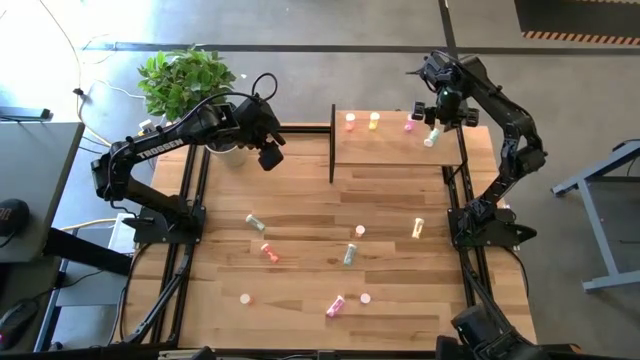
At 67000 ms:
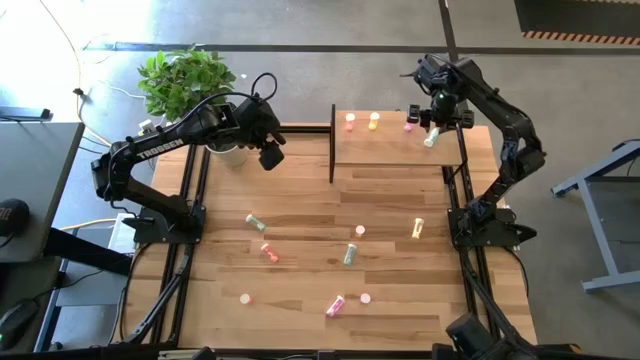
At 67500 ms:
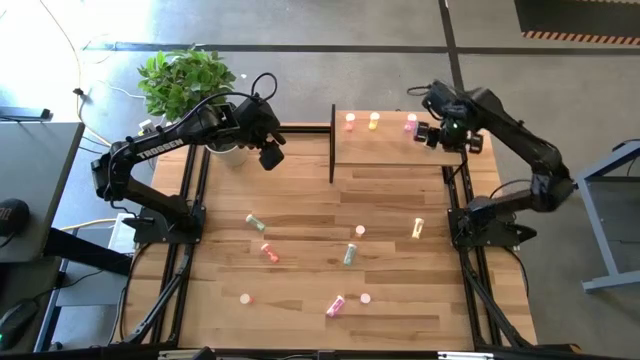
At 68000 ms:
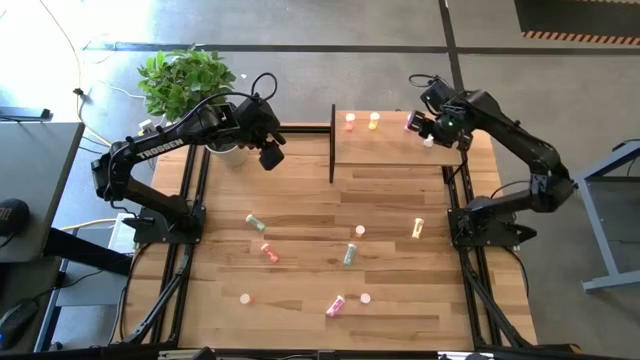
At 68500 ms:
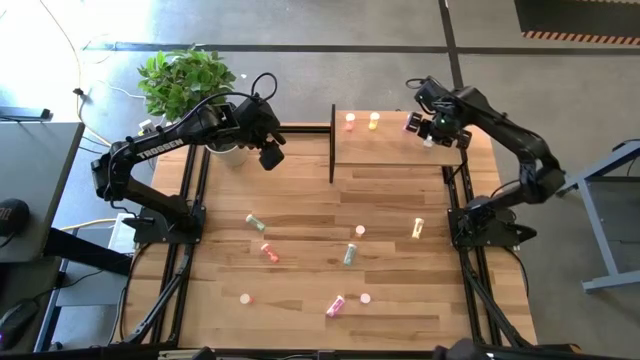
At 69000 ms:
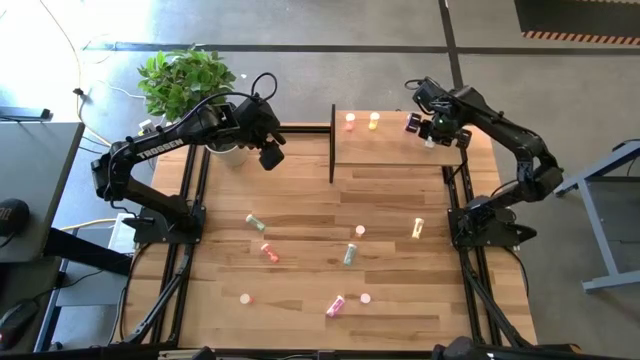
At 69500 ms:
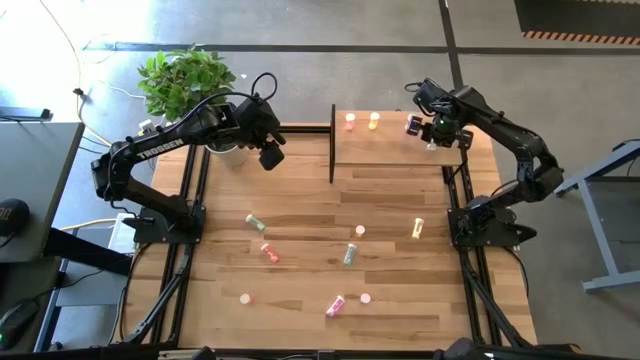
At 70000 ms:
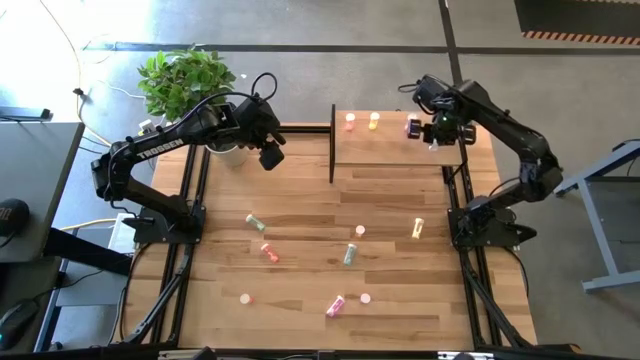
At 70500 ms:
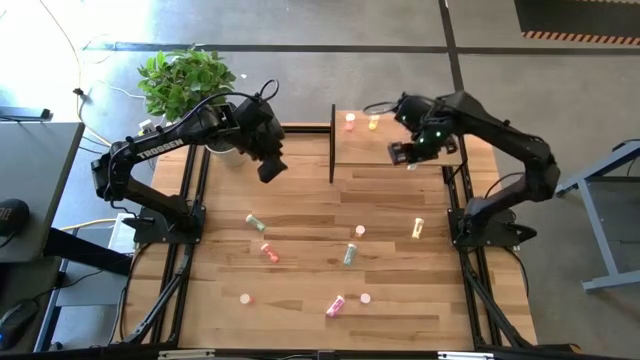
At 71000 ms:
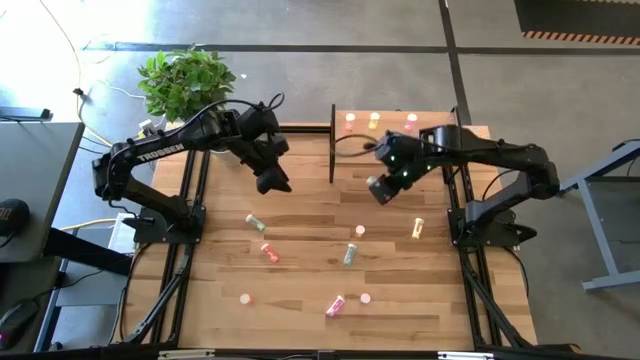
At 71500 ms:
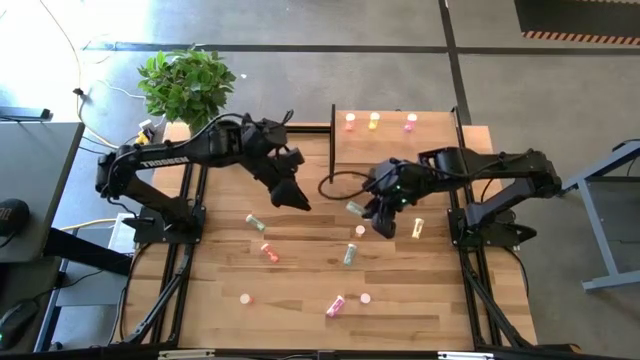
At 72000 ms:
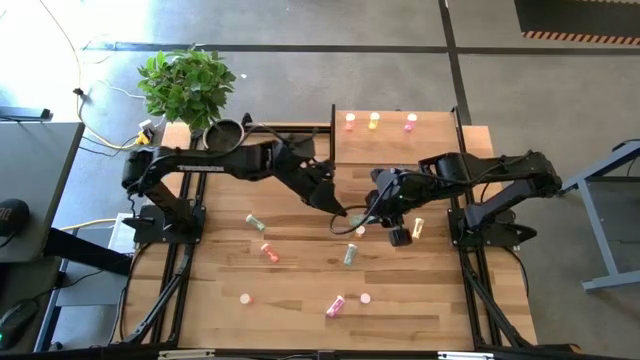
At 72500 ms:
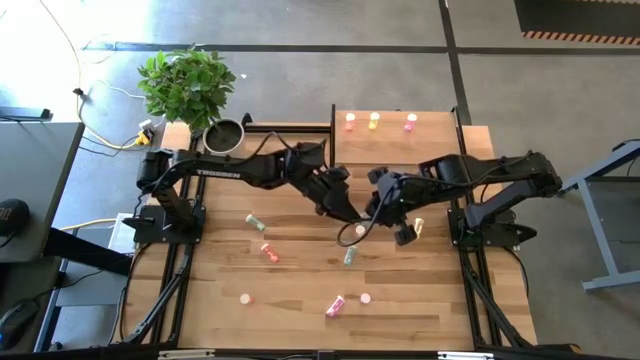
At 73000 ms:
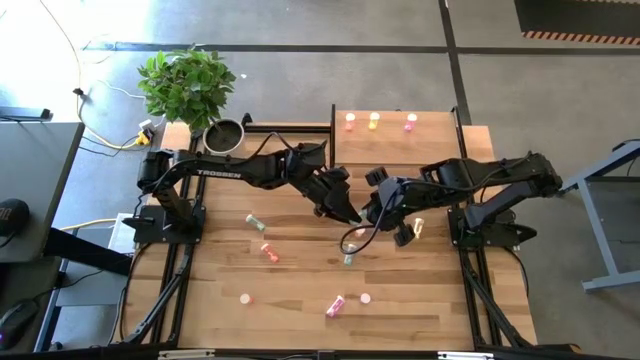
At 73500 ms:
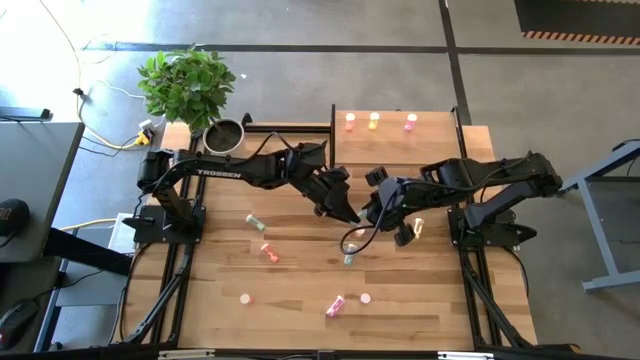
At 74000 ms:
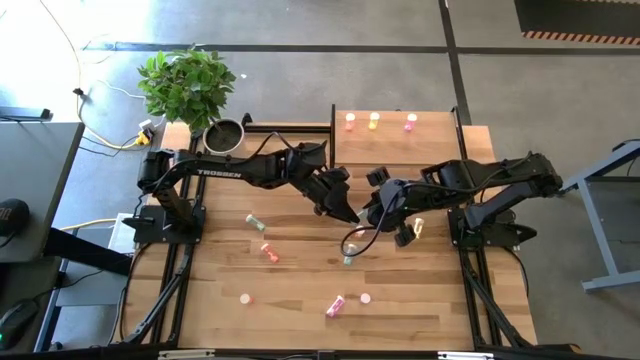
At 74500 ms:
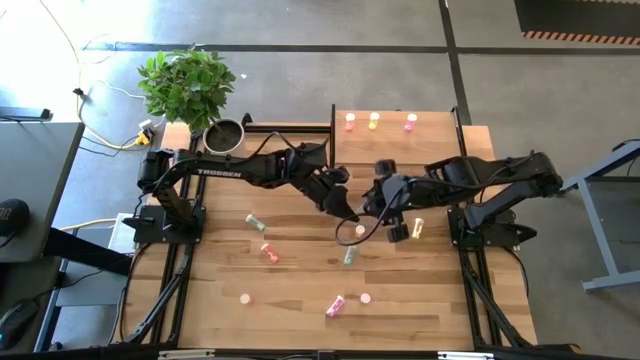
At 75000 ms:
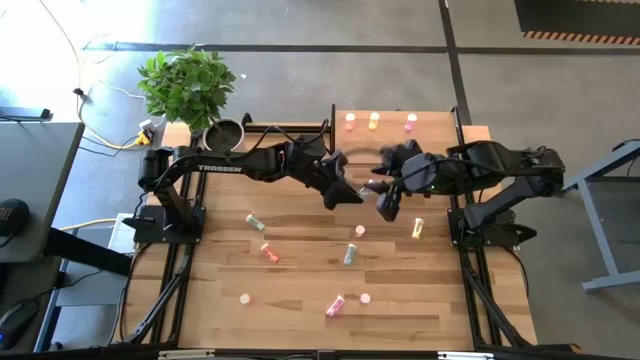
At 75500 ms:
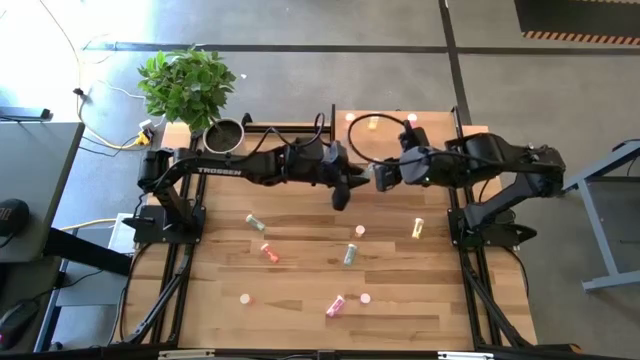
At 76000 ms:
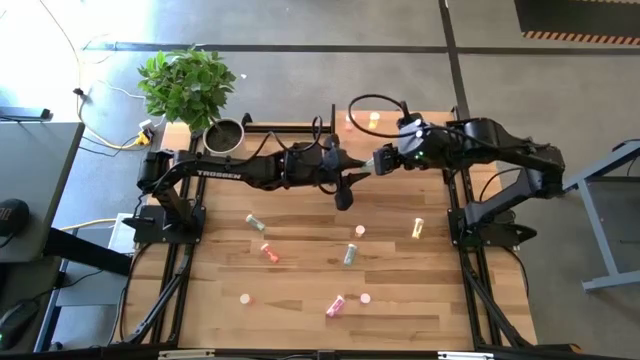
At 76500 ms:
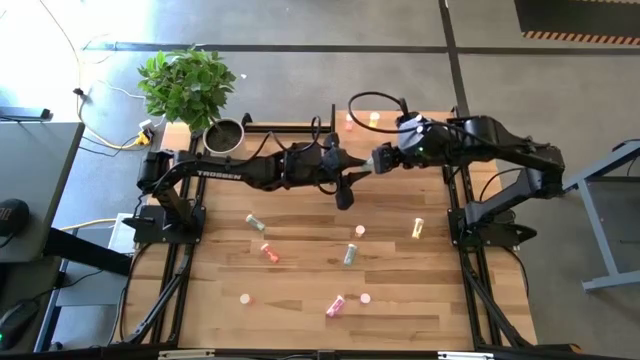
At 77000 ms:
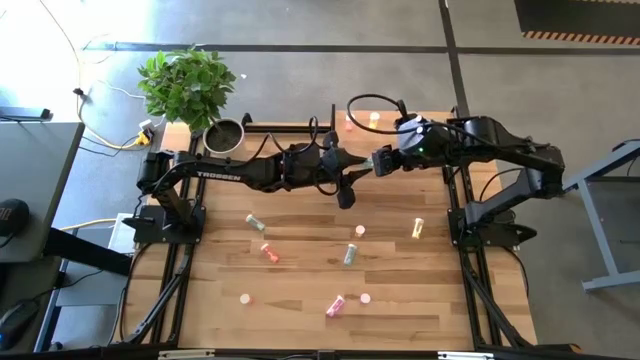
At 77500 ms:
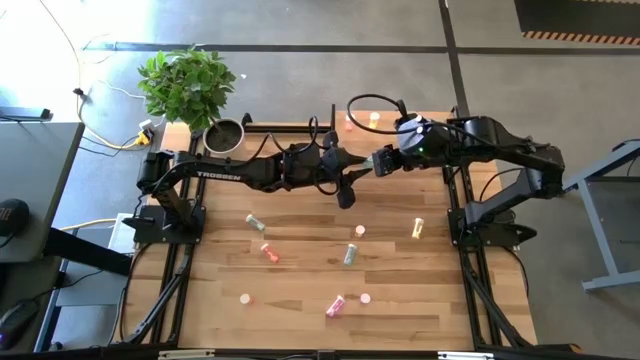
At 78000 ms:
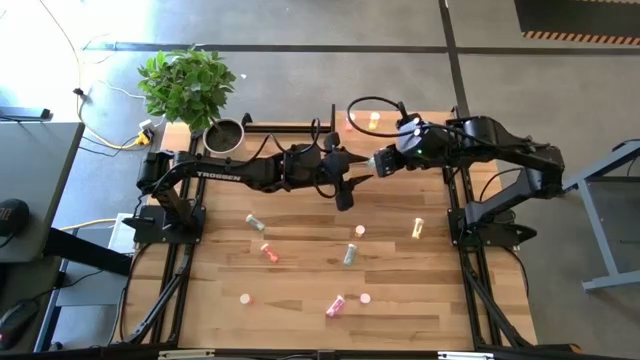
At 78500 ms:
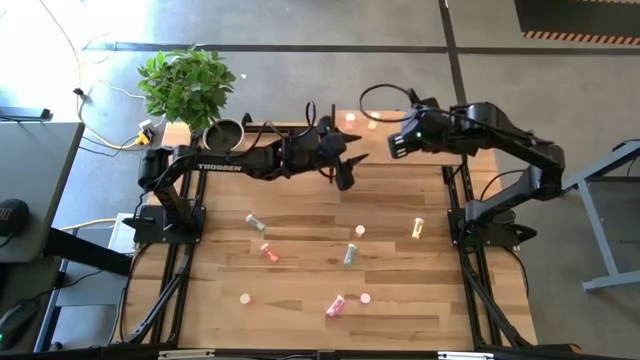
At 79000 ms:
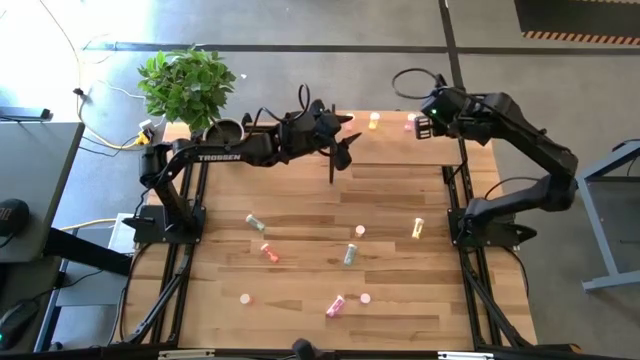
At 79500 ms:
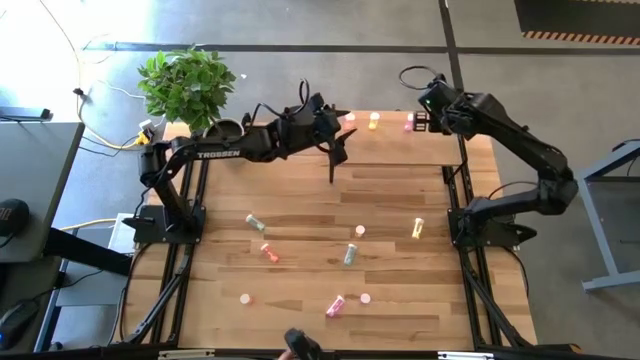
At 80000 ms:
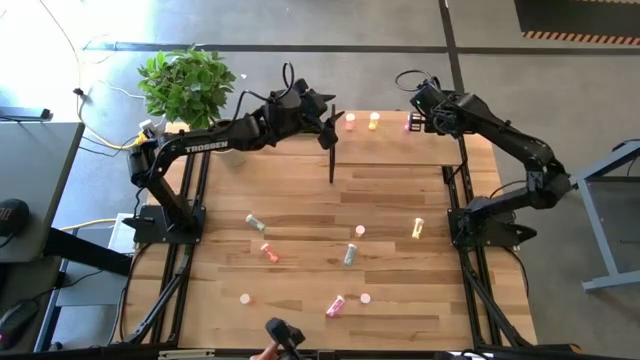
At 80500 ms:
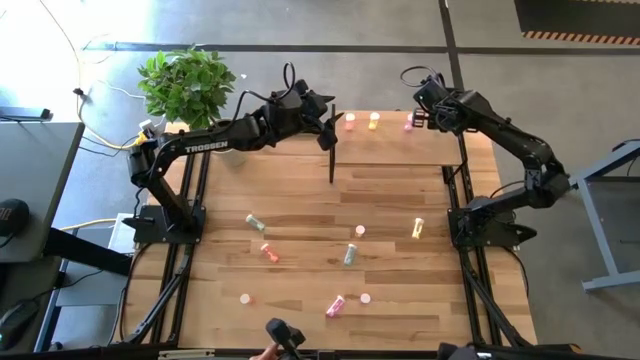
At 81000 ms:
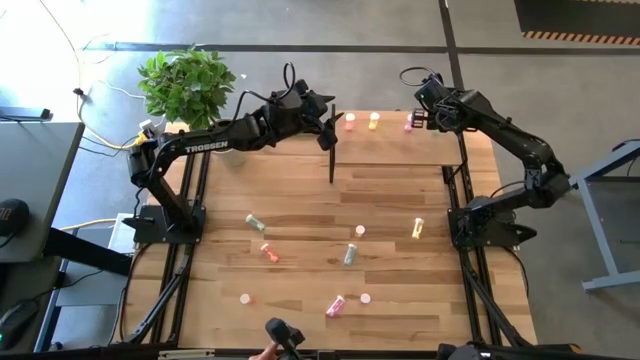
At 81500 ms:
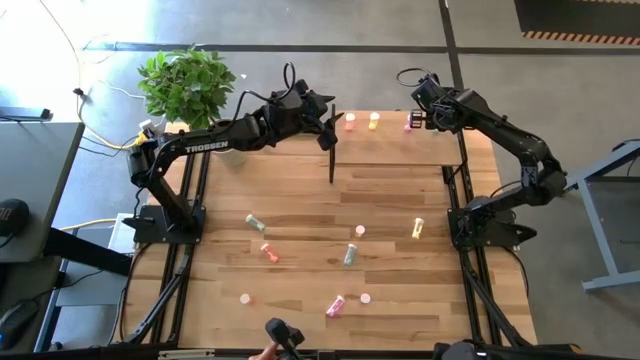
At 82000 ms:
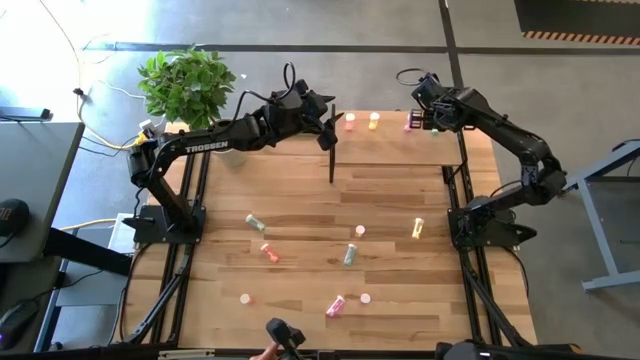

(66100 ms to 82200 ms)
Task: Pick and place medicine bottles onto shelf by color
Put the bottom blue medicine bottle on the shelf

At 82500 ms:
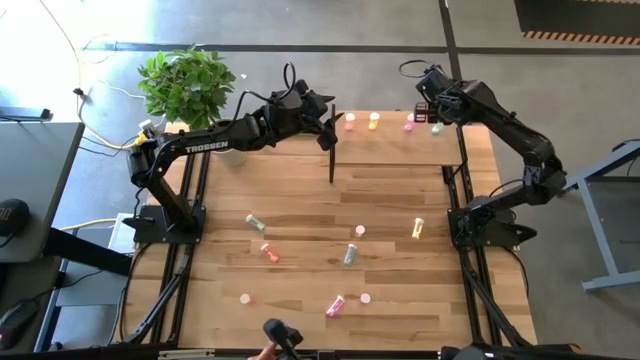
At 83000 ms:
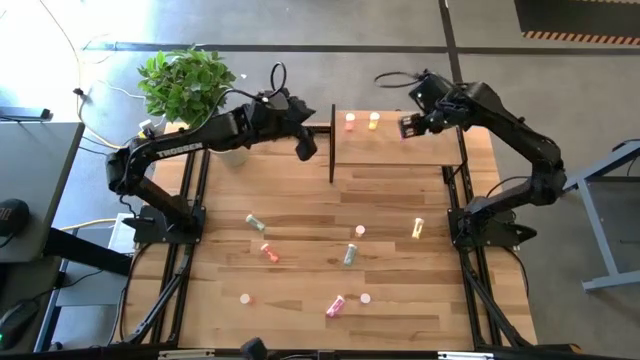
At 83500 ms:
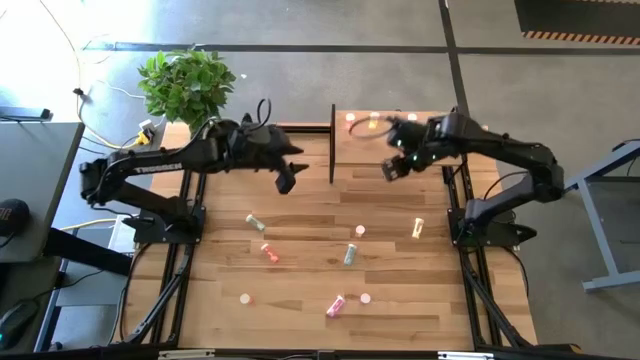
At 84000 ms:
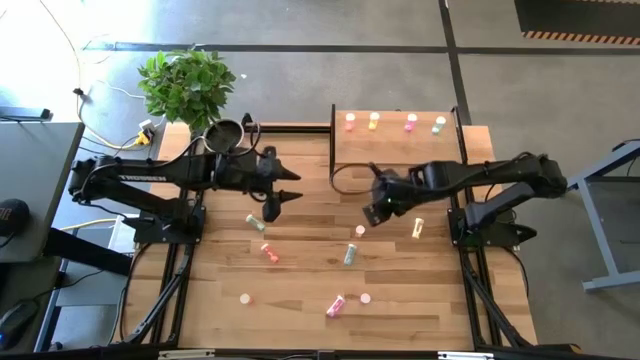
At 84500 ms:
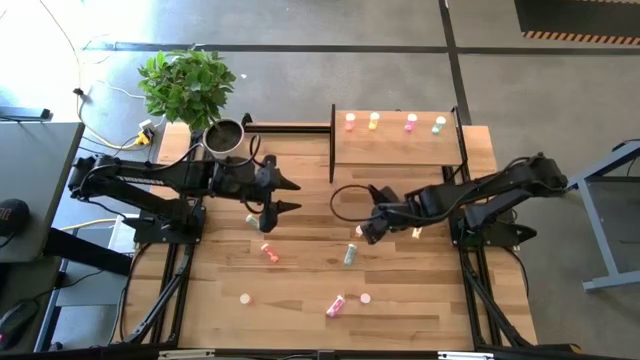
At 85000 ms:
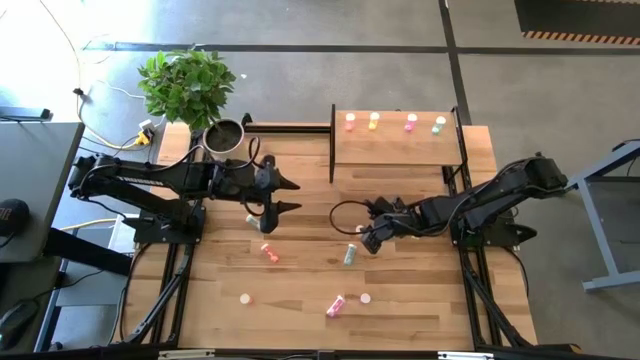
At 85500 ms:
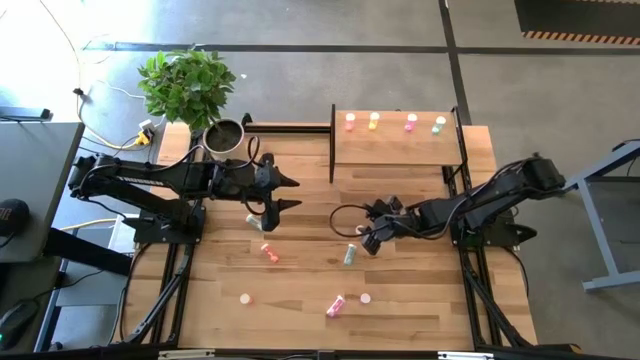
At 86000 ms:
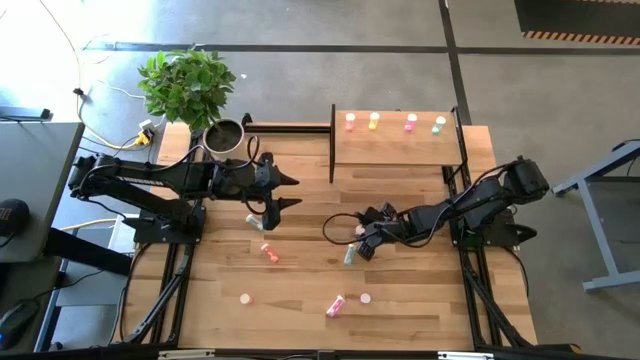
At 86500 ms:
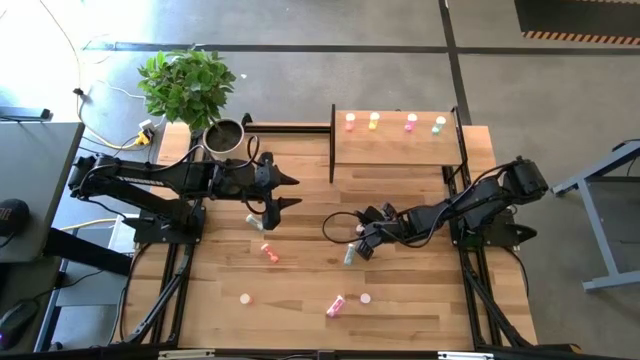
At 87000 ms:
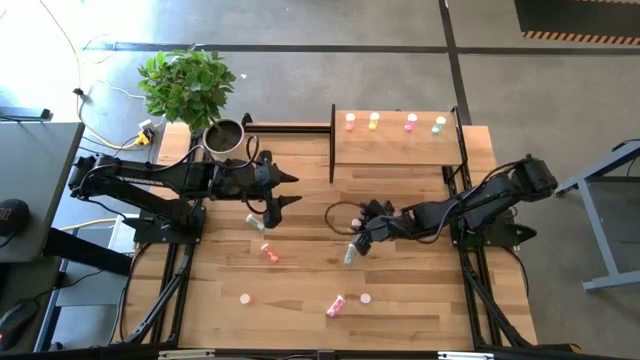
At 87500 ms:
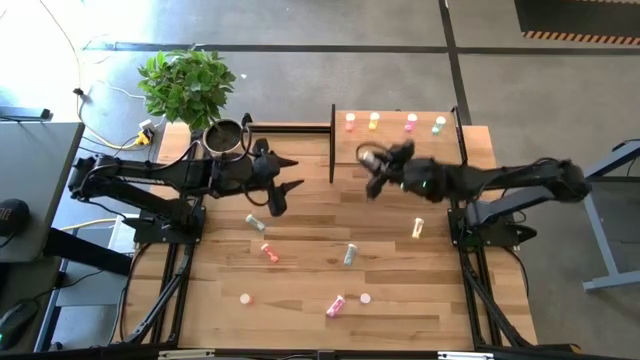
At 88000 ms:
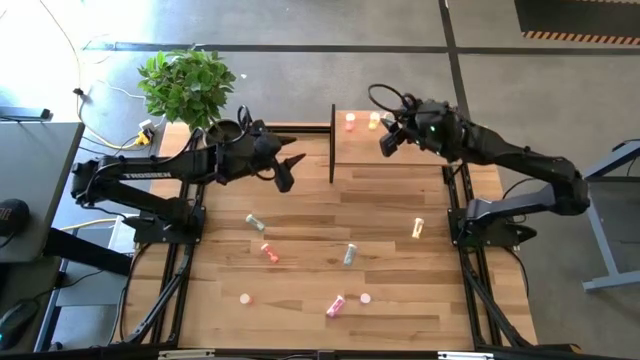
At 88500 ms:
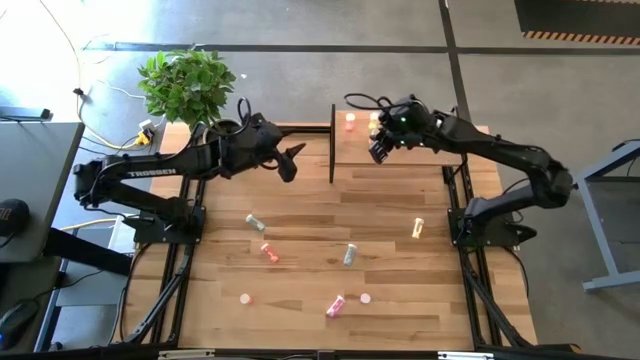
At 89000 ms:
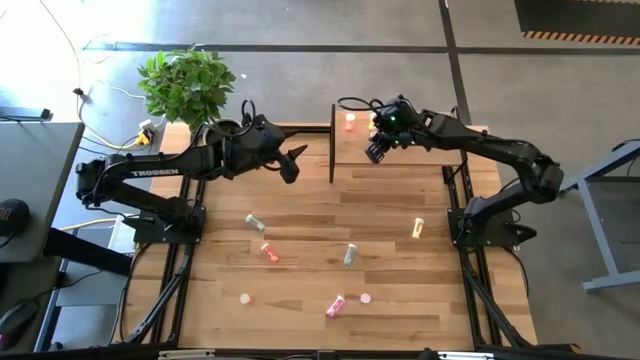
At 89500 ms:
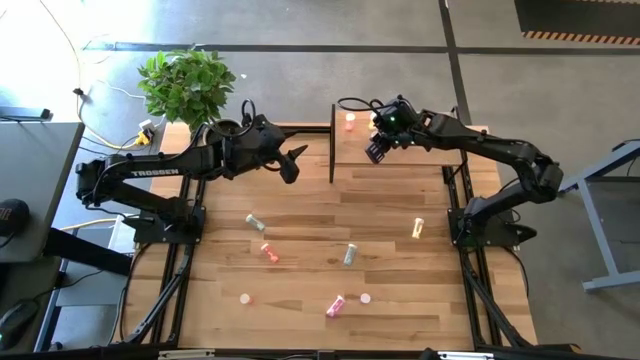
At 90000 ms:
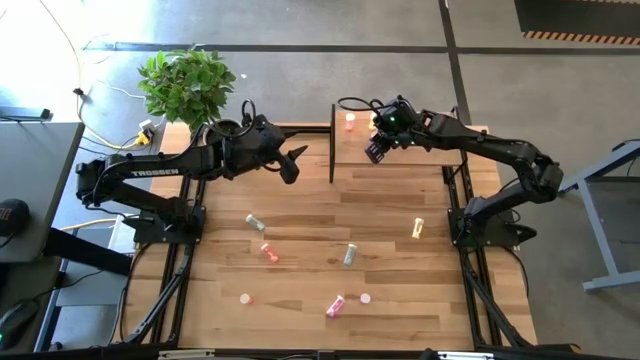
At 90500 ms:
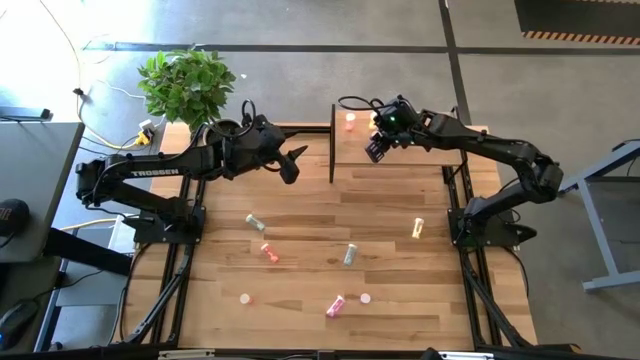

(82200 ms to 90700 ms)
Put the left yellow medicine bottle aligned with the other yellow medicine bottle on the shelf
